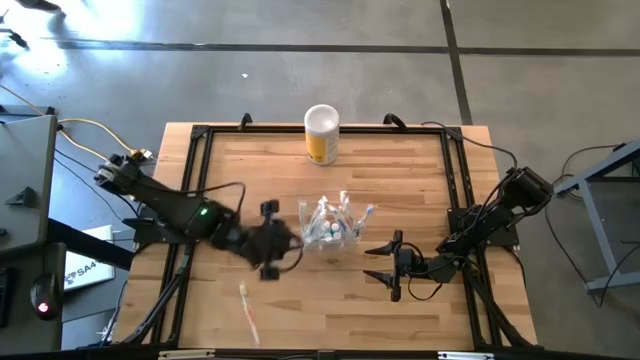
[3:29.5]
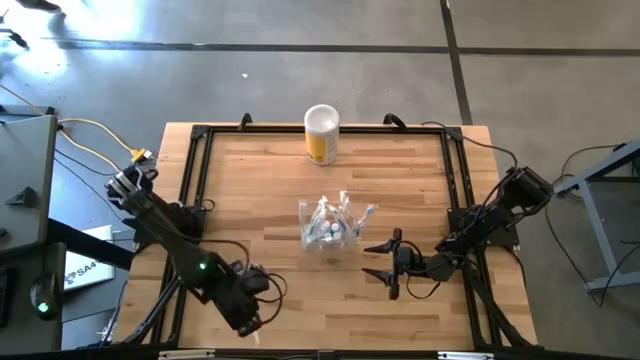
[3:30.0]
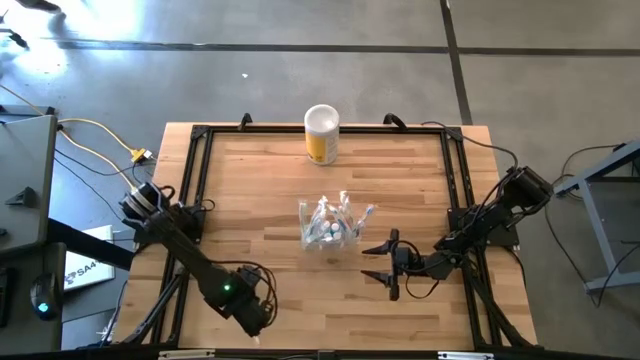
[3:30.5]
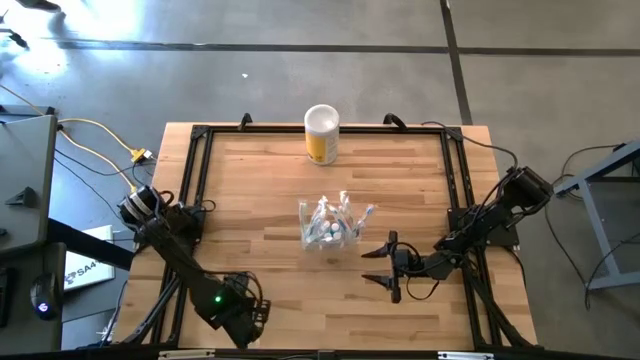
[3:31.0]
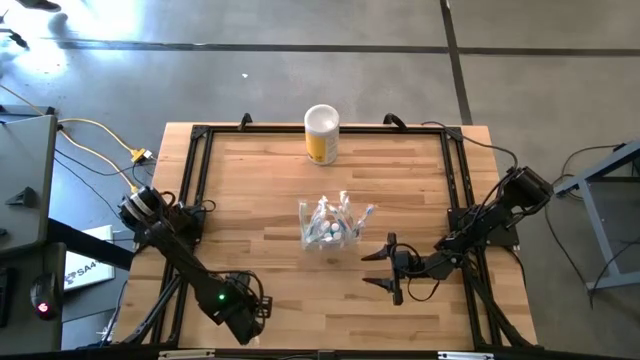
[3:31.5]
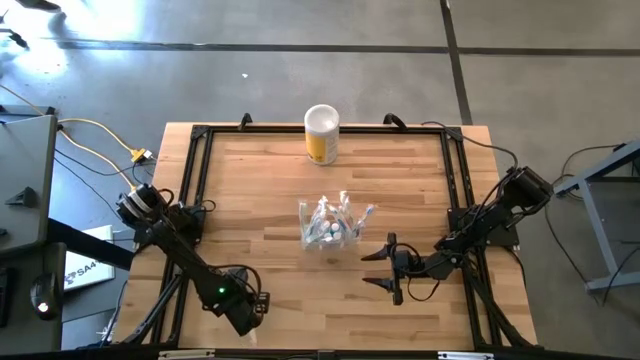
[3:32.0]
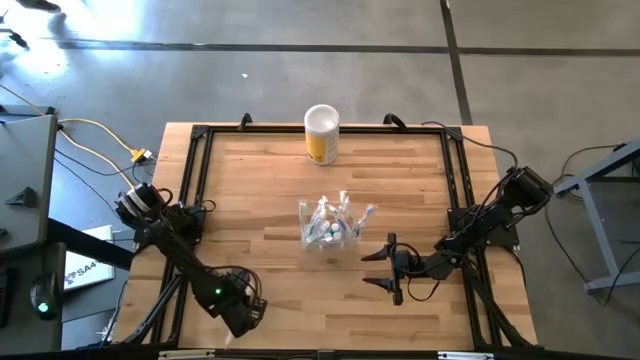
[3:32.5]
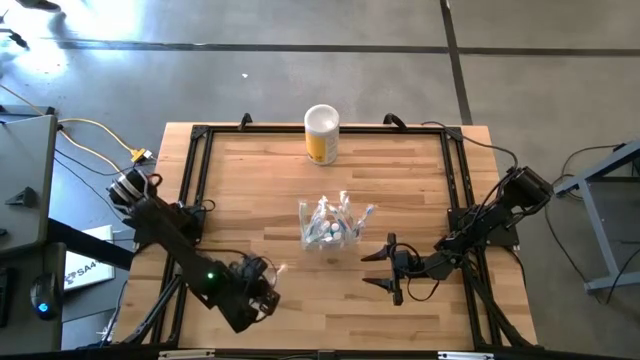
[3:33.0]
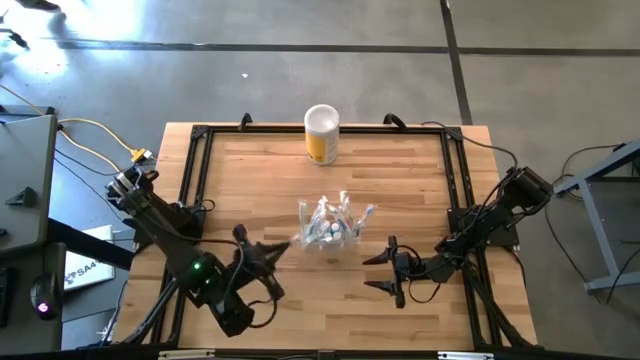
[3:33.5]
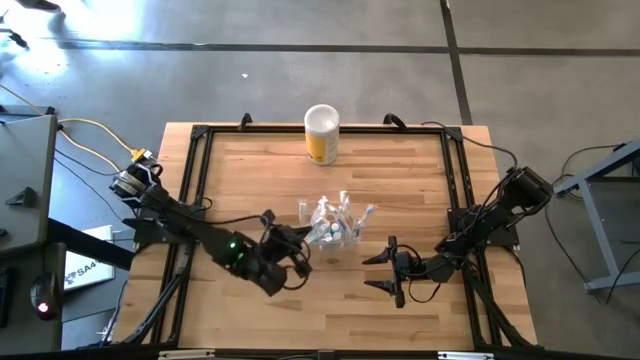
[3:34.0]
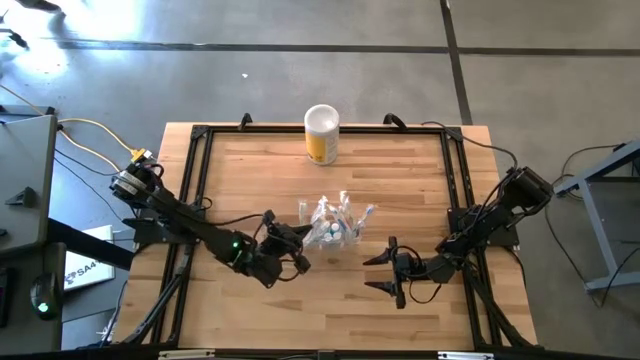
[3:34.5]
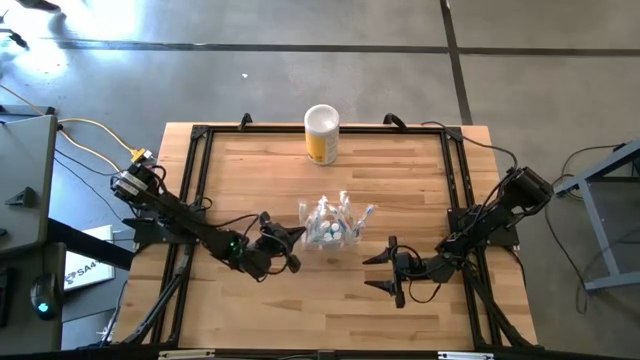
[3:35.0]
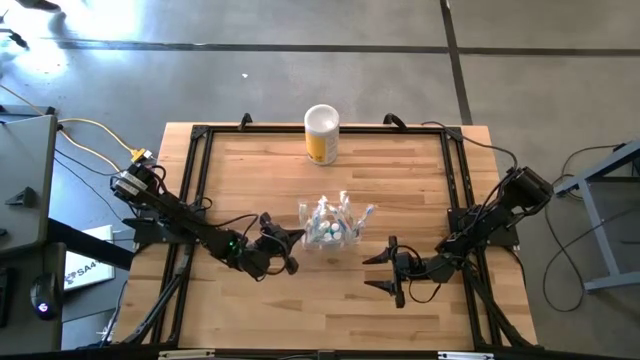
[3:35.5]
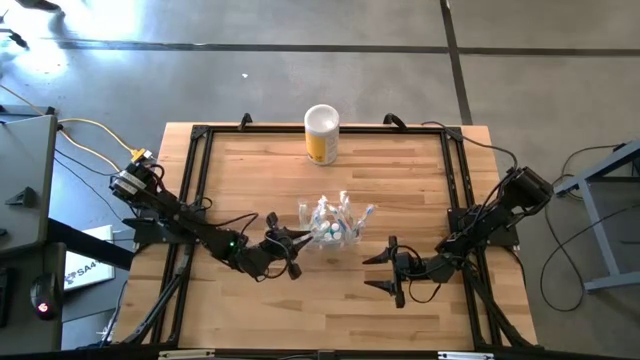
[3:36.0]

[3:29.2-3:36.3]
Task: Pick & Place toothbrushing station
Put the orange toothbrush into the left part of the transparent organizer

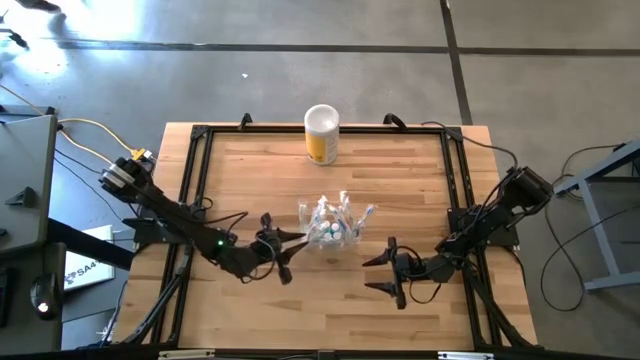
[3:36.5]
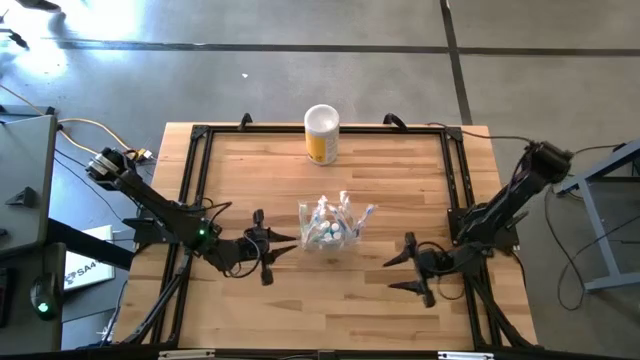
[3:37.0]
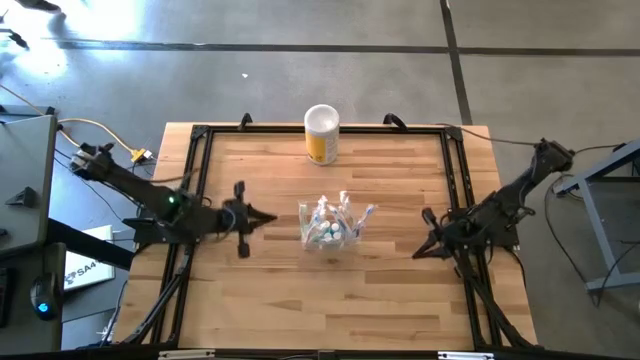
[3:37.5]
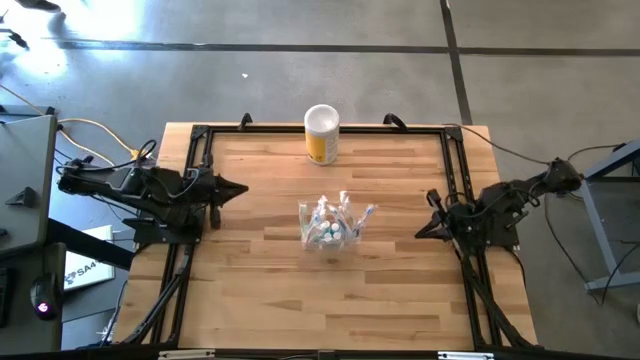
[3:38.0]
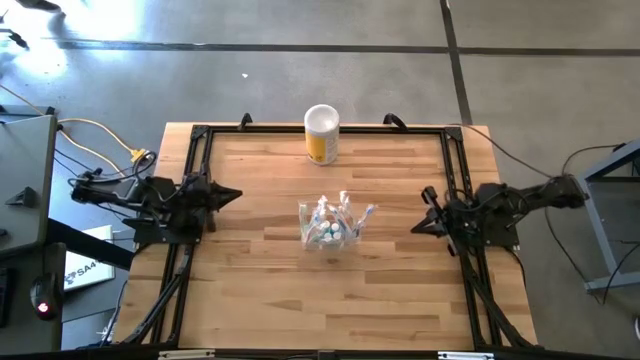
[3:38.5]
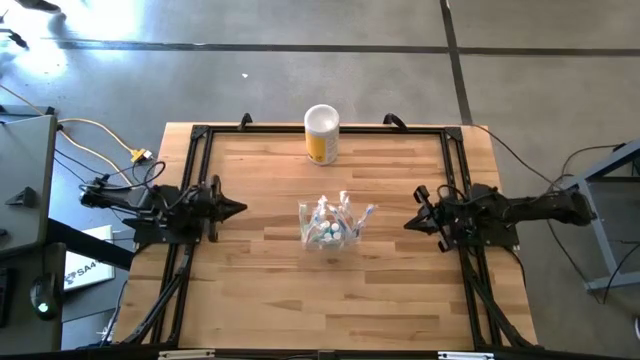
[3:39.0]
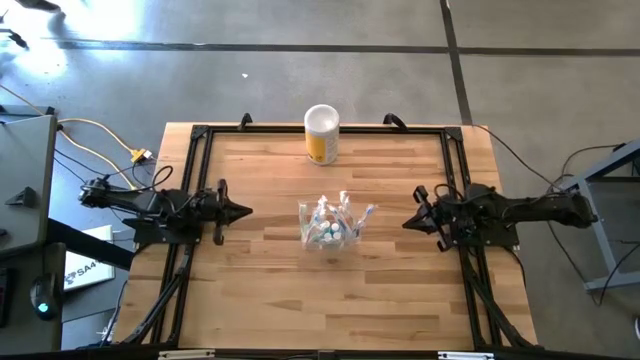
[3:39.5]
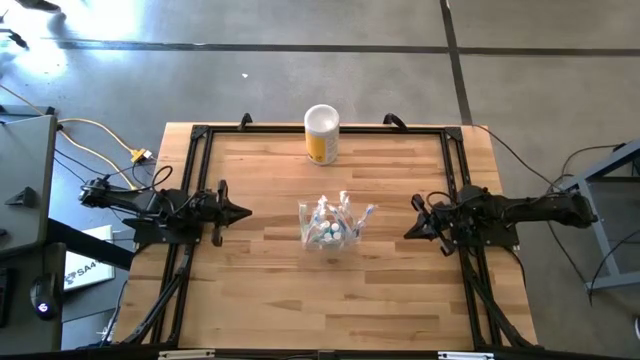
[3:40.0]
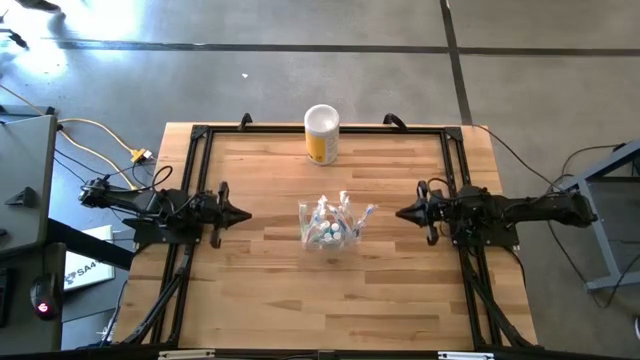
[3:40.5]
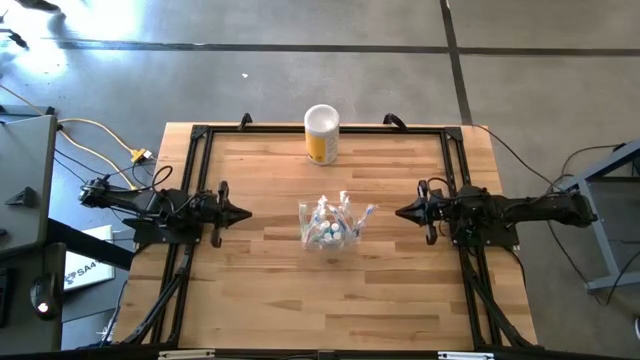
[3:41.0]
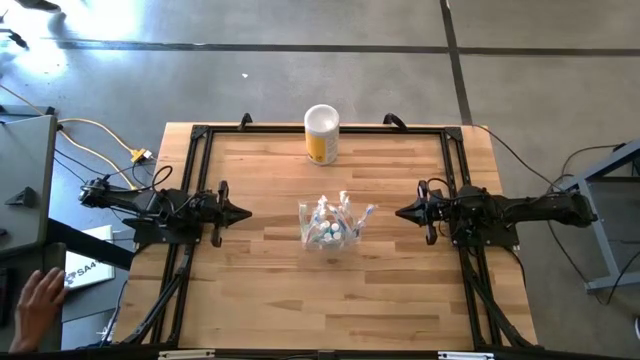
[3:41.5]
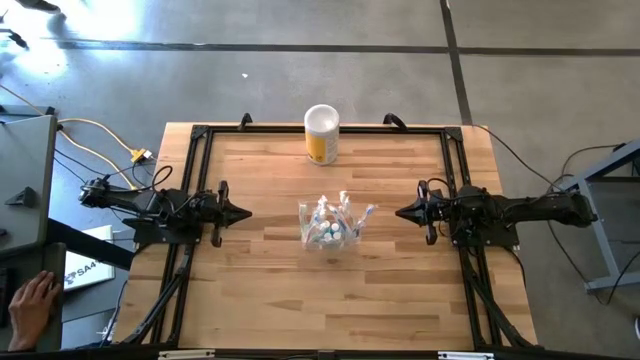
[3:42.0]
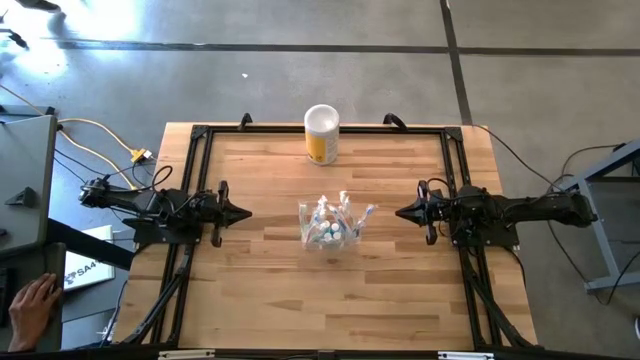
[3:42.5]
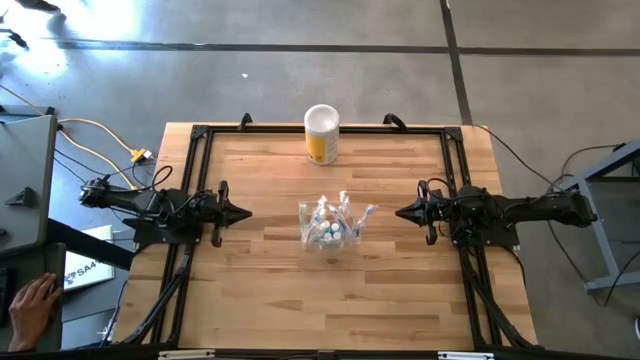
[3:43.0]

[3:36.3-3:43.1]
Return to Home Position

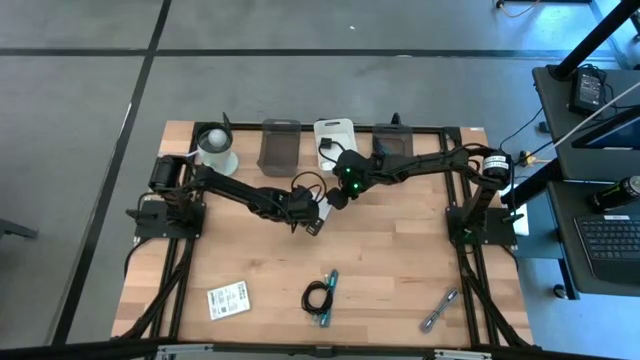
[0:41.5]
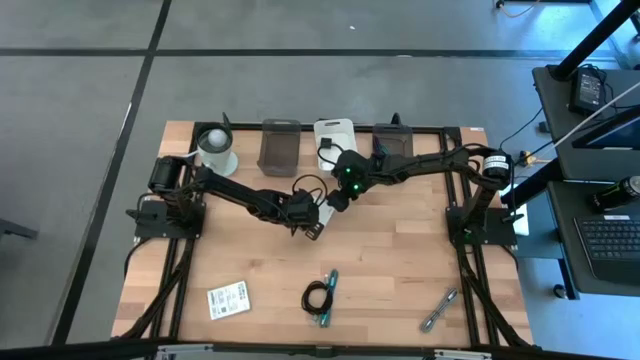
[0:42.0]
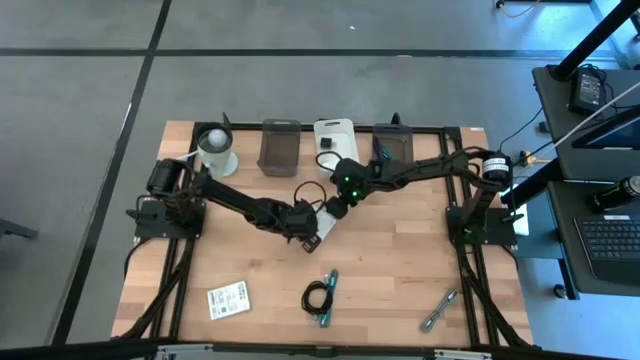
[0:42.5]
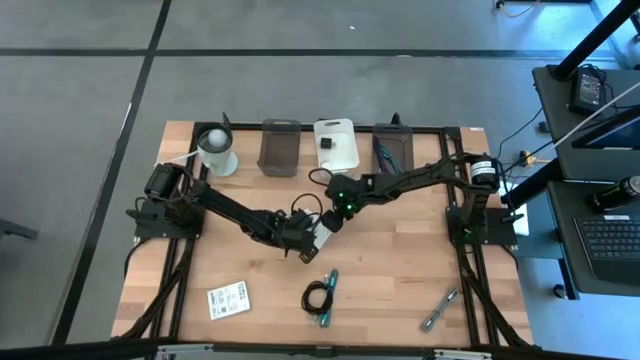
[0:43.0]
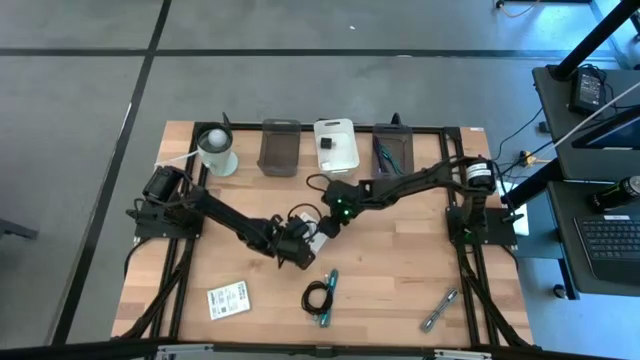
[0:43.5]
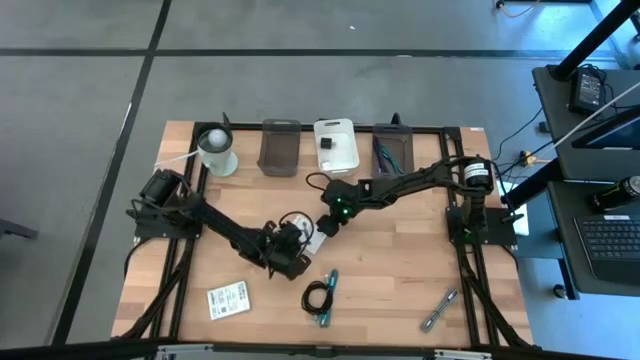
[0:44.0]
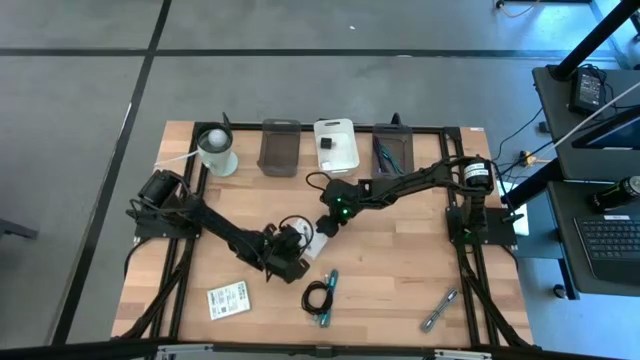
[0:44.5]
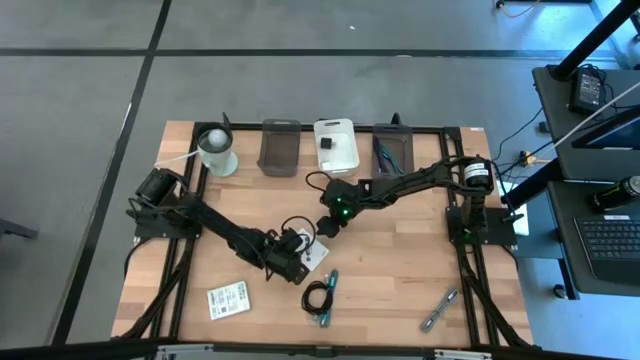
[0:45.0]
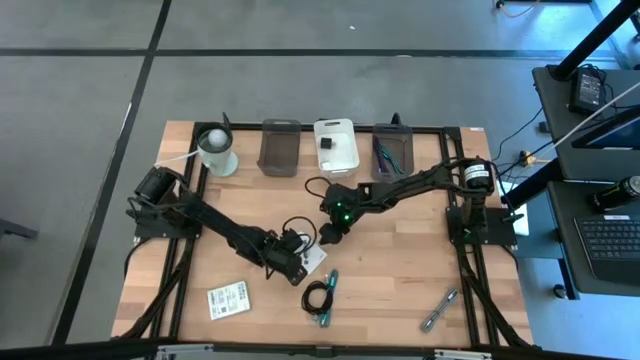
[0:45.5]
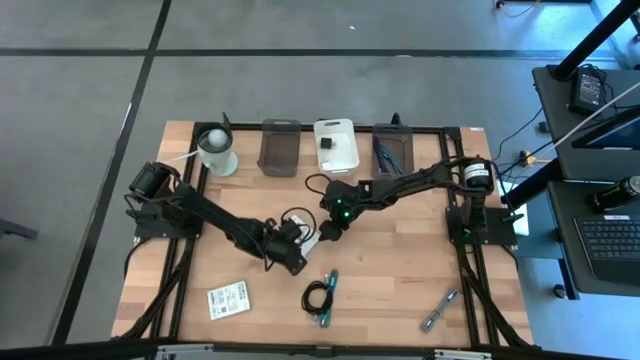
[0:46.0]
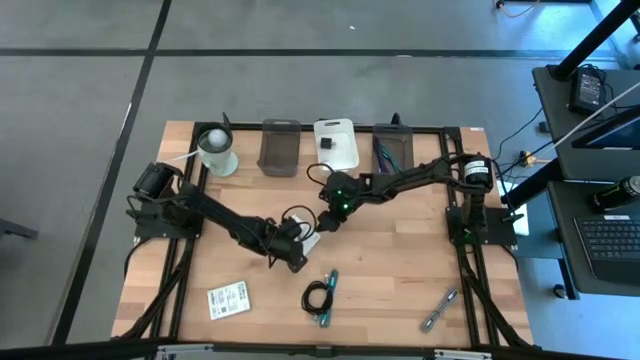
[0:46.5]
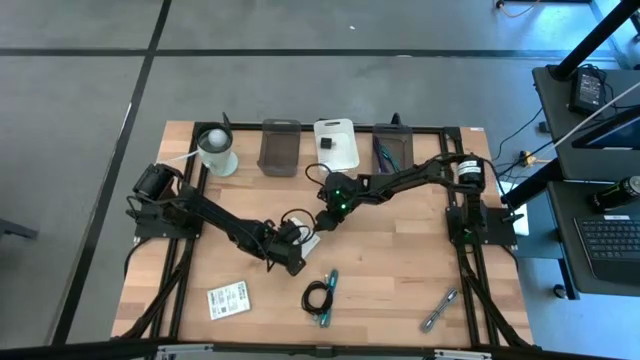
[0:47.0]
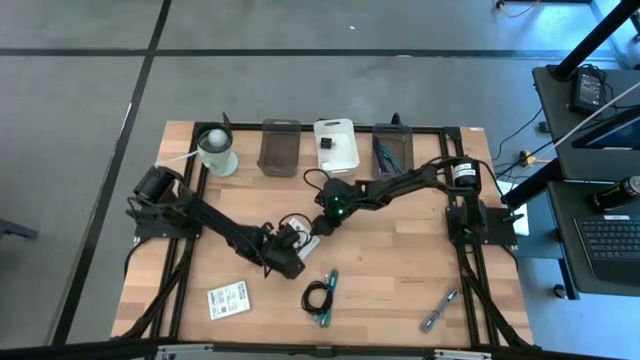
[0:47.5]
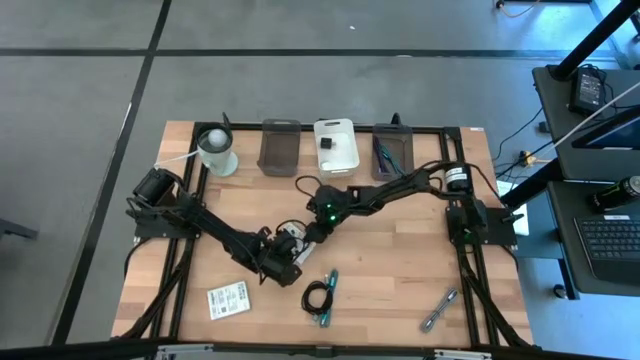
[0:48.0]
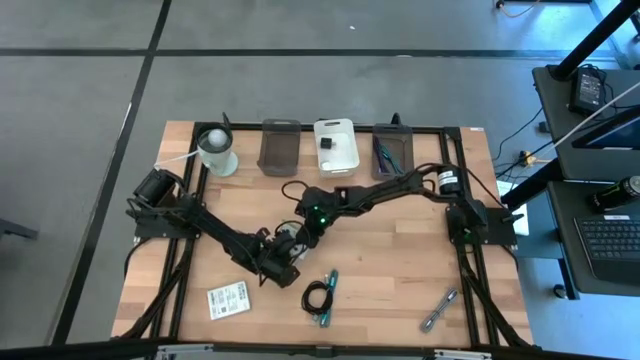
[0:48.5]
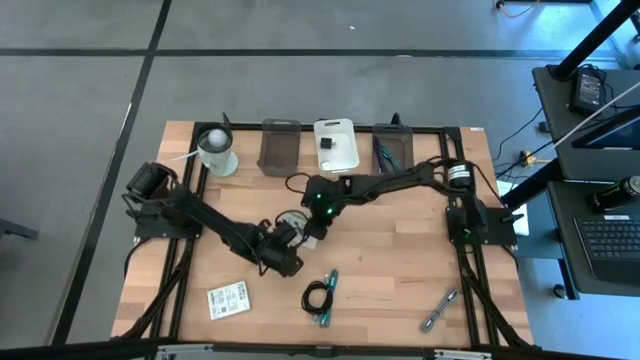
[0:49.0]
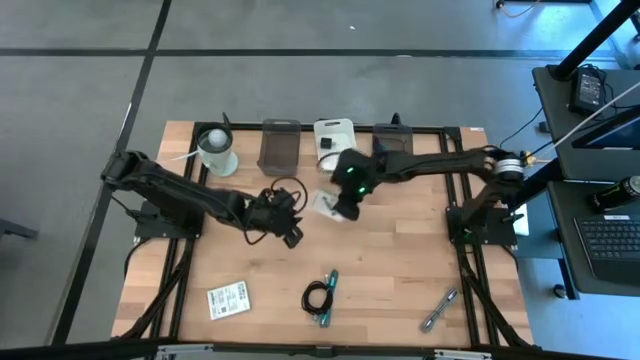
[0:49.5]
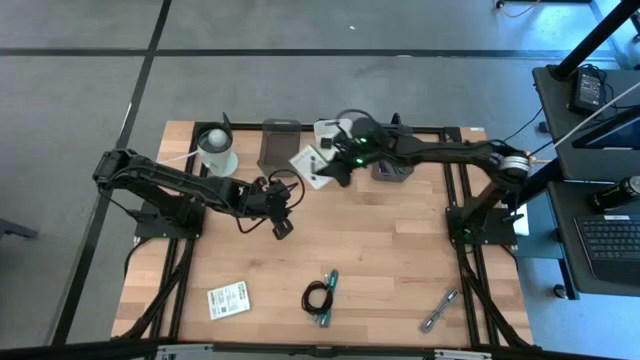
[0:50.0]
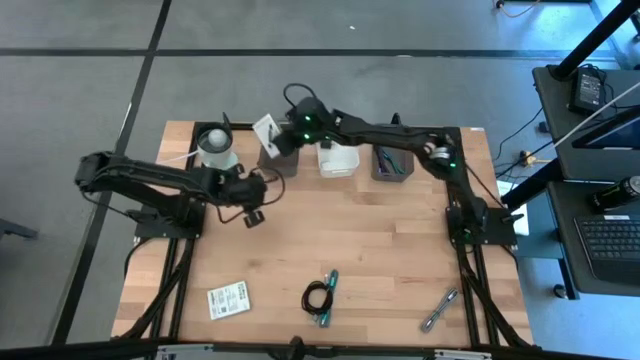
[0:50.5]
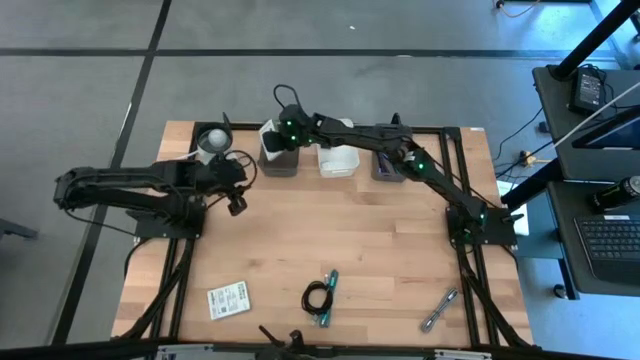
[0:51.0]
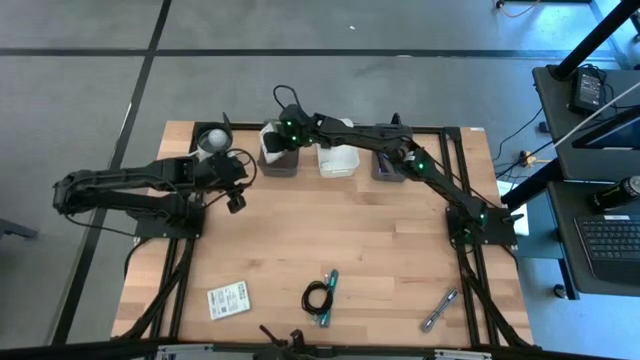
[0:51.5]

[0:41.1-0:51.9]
Task: Pick and place items into bin
Put the card reader box into the left black bin
